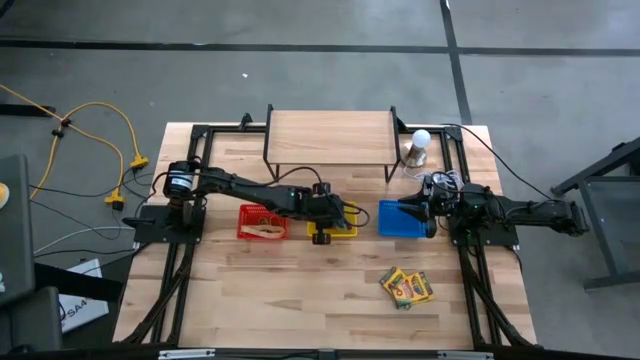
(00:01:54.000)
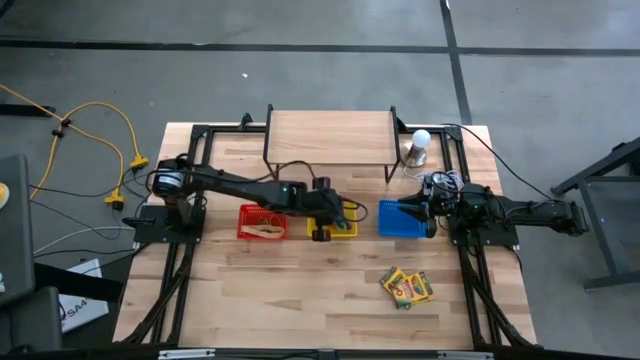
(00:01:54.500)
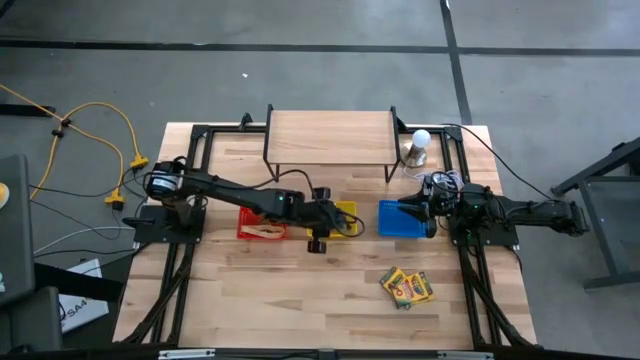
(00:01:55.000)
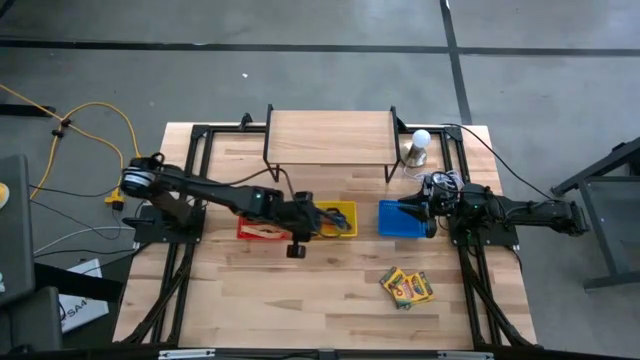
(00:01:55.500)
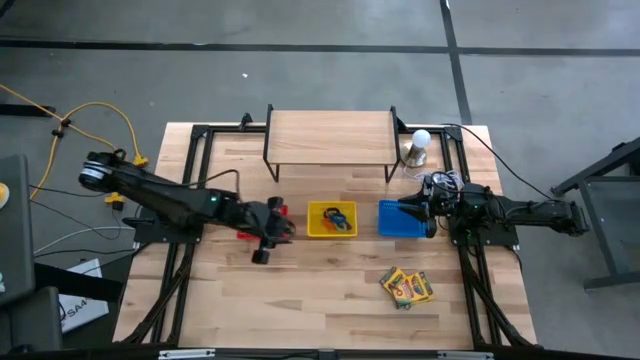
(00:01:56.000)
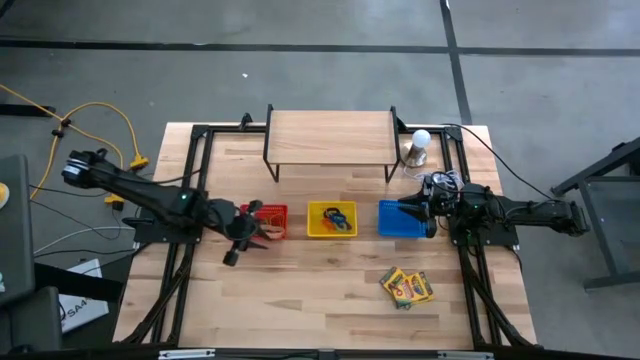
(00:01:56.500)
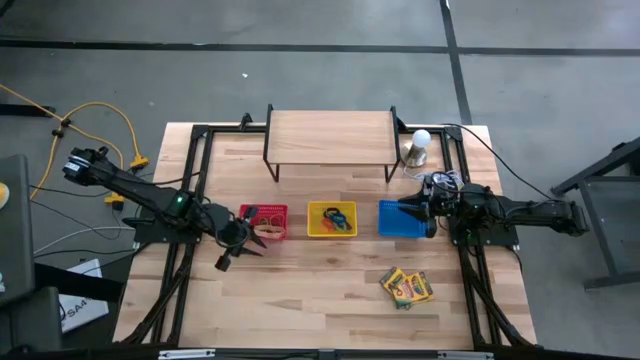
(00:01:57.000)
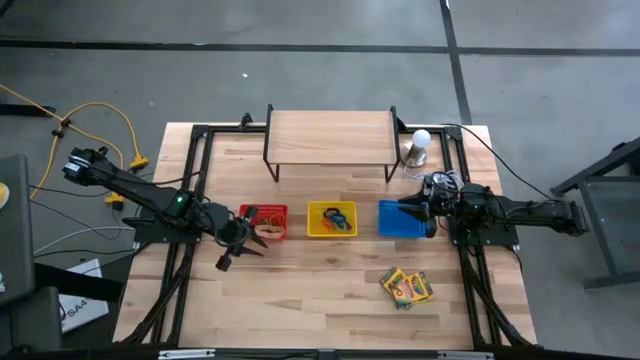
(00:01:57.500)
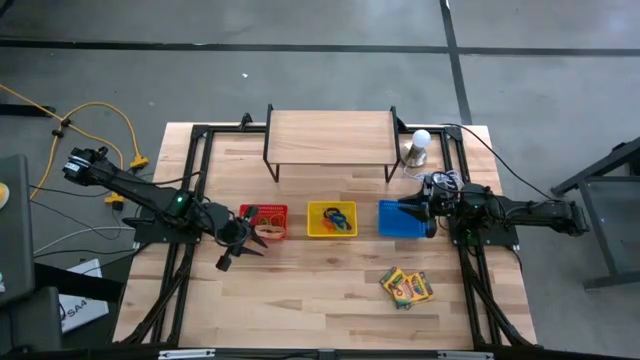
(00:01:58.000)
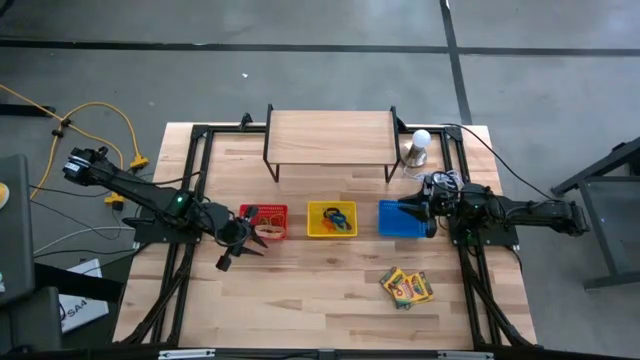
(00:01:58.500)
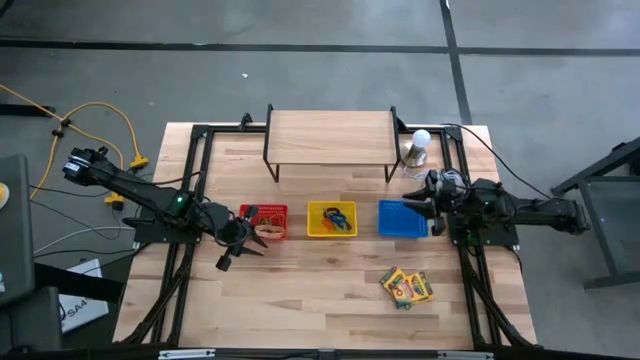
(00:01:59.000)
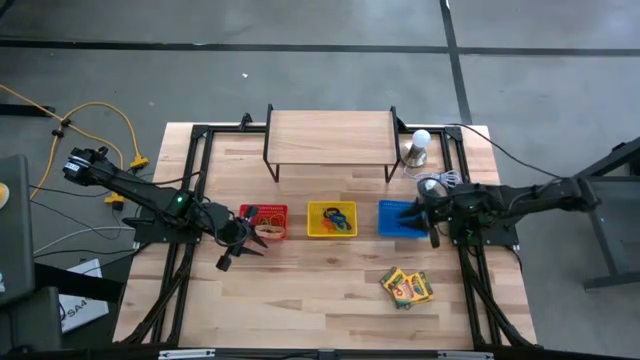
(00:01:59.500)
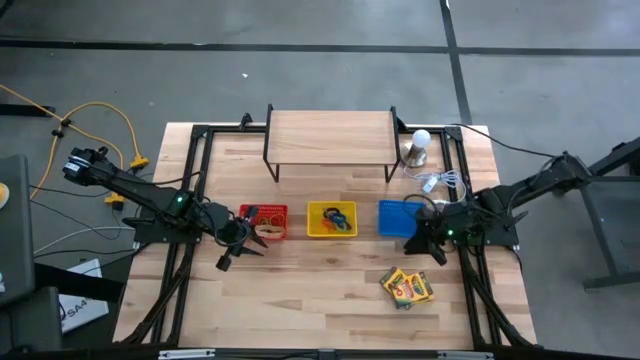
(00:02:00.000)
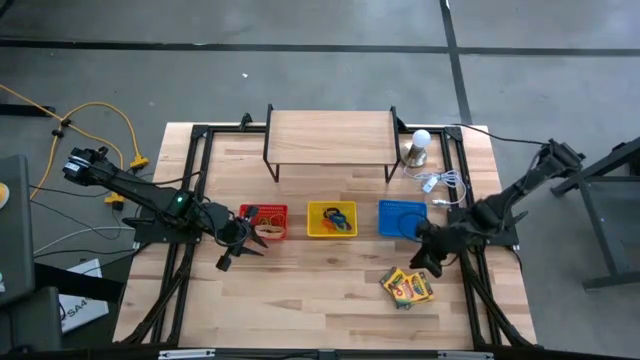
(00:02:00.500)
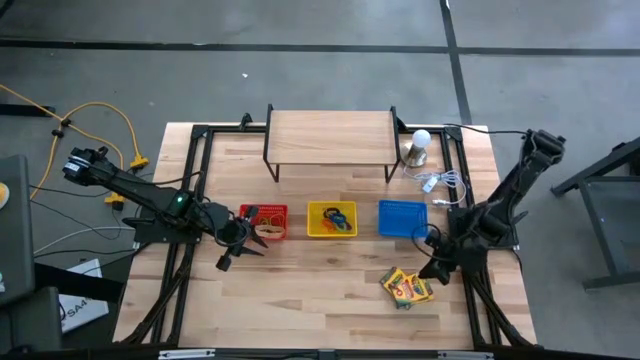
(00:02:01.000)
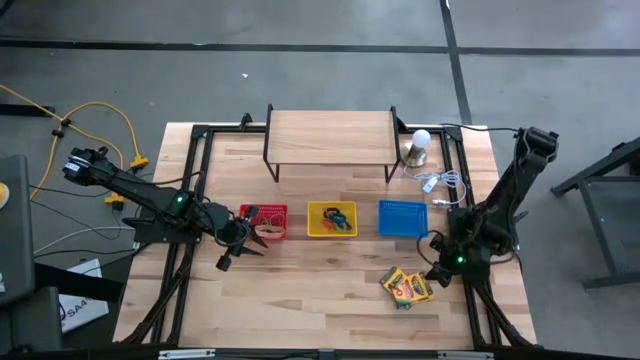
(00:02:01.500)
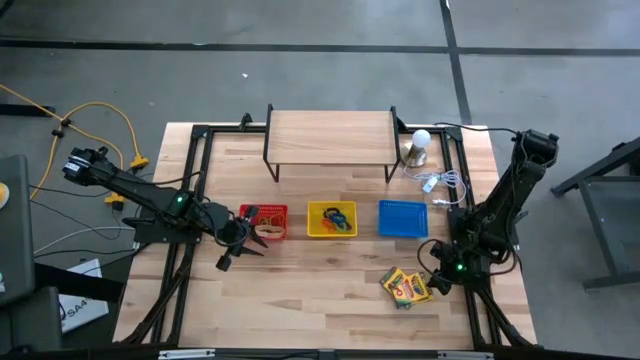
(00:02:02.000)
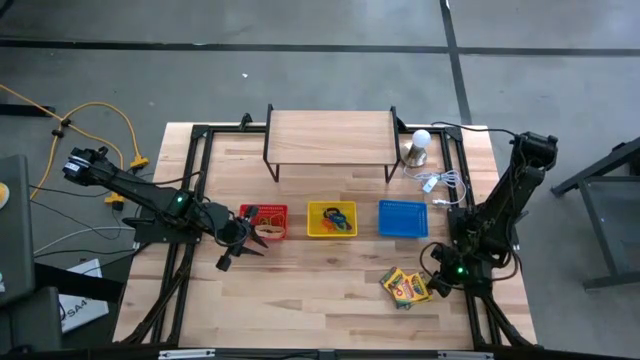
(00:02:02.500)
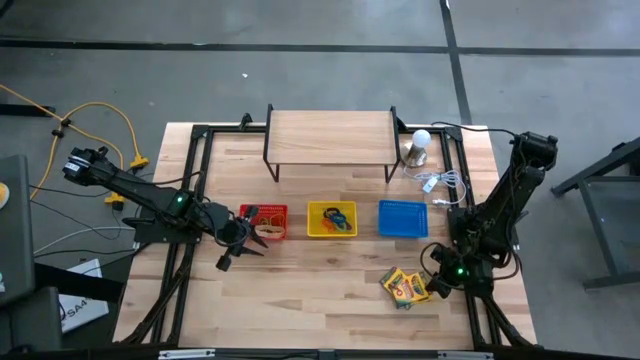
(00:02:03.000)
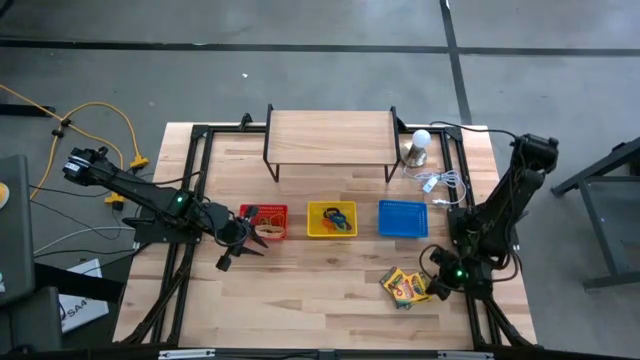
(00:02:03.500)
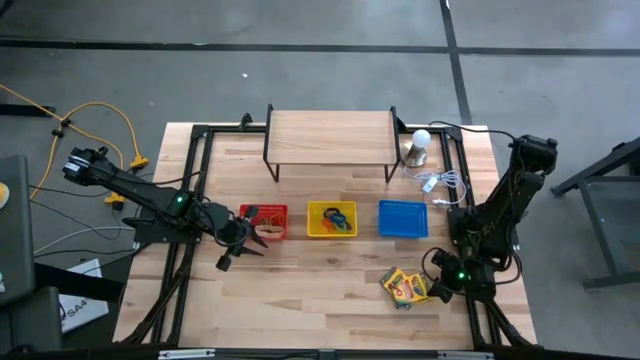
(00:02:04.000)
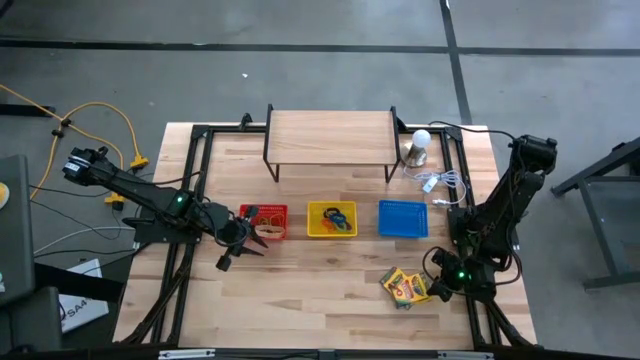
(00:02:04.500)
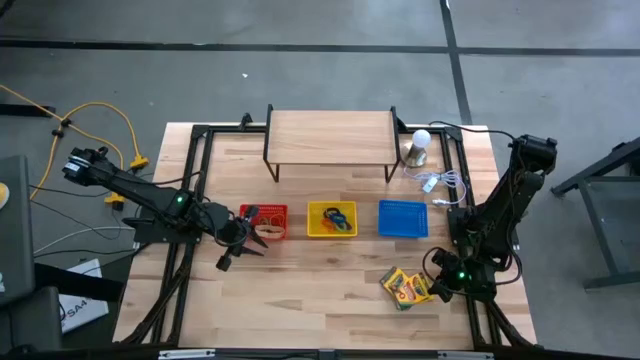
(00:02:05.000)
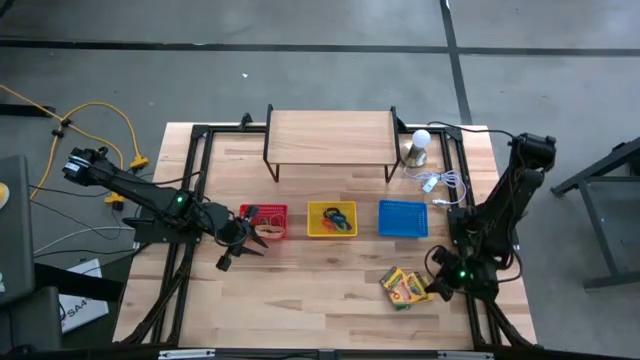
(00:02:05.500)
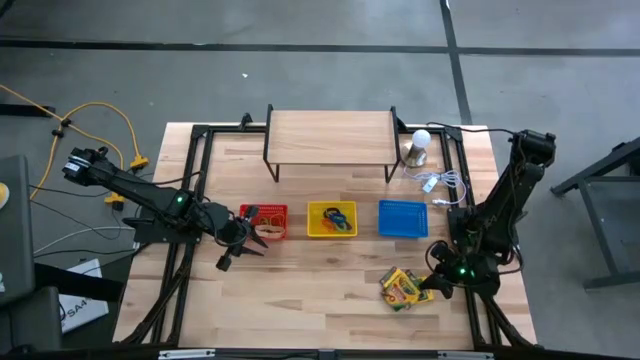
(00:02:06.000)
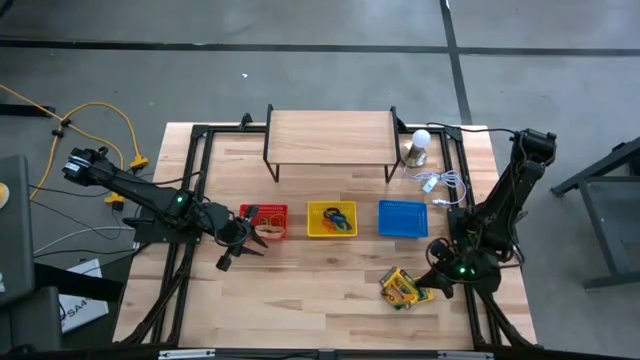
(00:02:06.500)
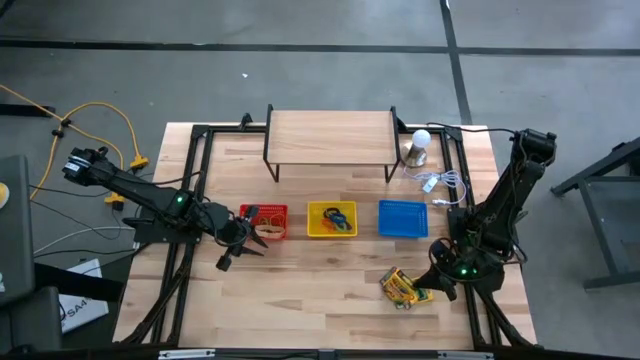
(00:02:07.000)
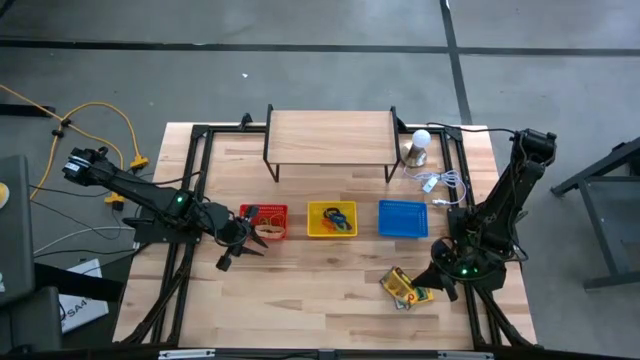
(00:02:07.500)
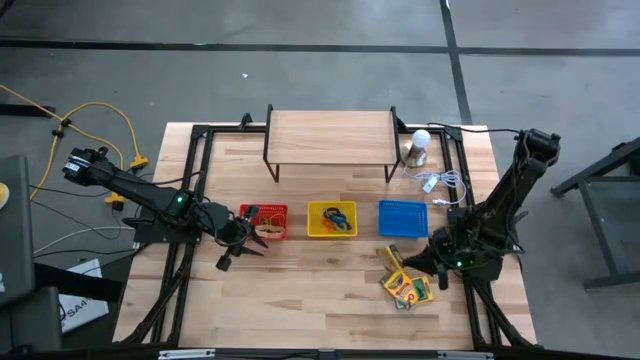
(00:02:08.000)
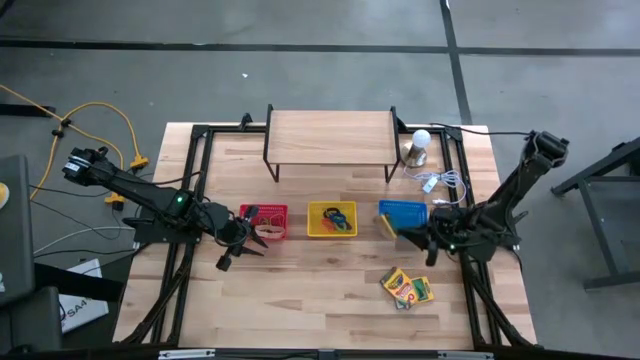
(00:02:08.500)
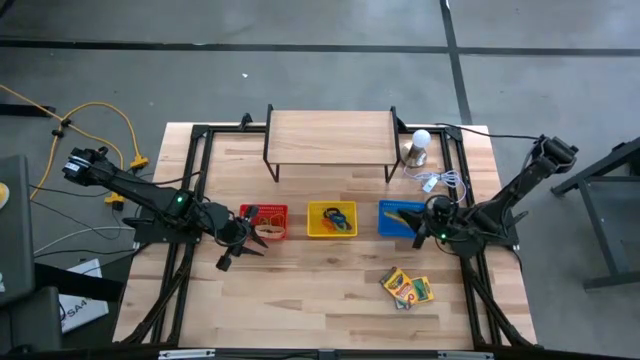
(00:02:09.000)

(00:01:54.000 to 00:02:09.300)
Task: Pick & Place Office Desk Supplies
Put the box of crayons into the blue bin

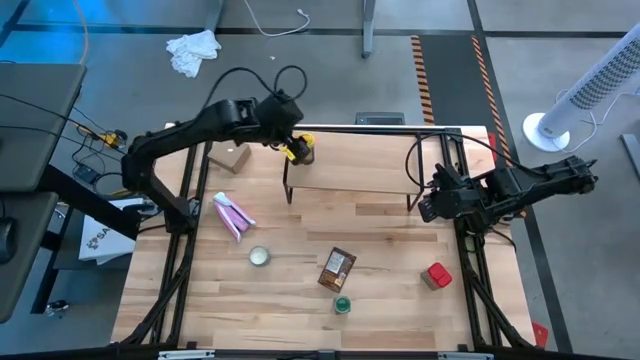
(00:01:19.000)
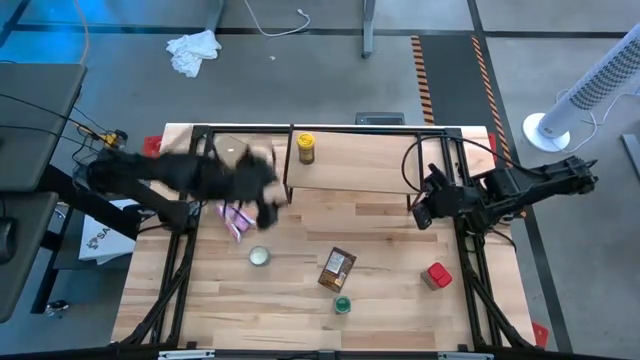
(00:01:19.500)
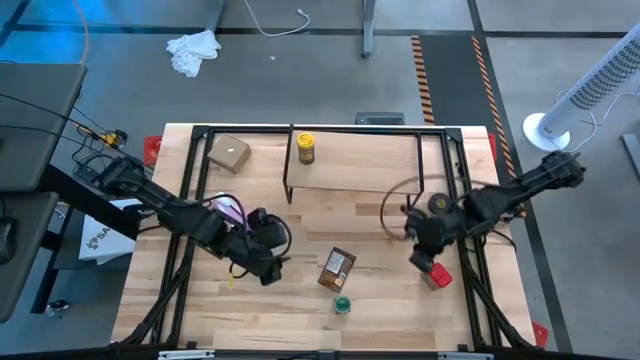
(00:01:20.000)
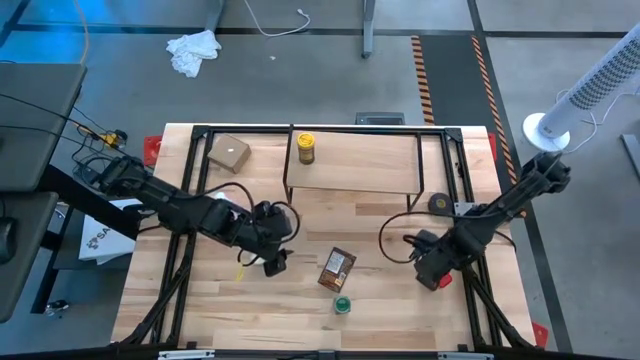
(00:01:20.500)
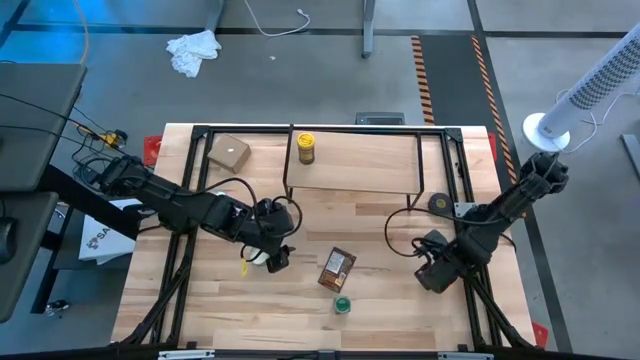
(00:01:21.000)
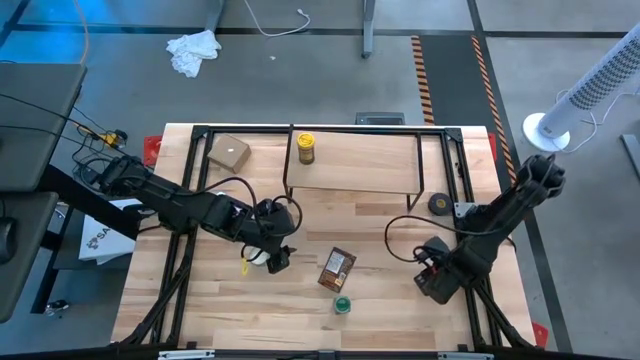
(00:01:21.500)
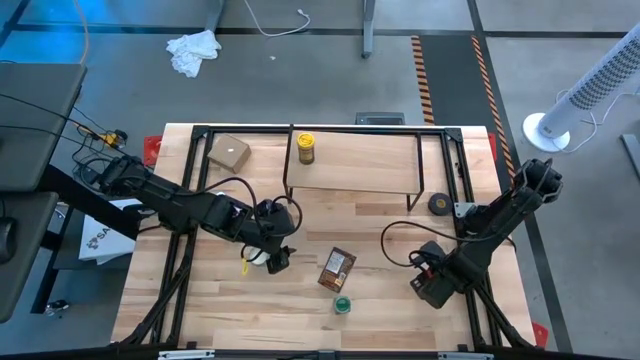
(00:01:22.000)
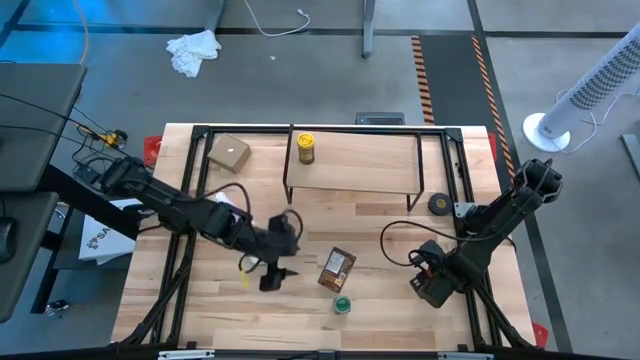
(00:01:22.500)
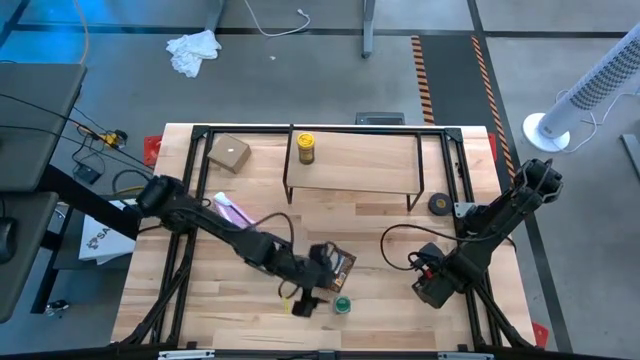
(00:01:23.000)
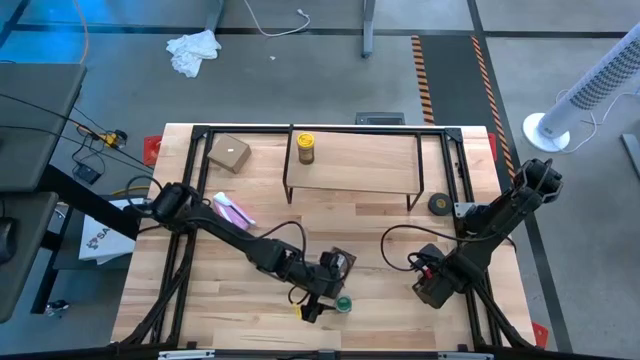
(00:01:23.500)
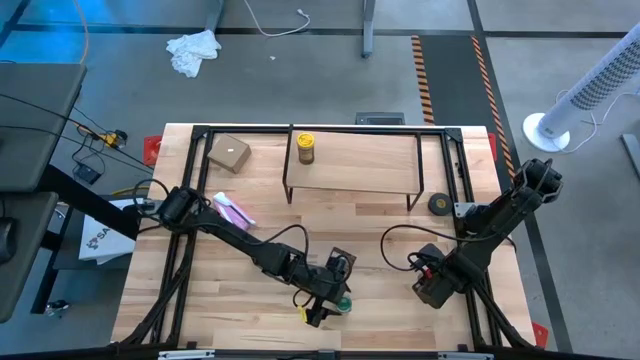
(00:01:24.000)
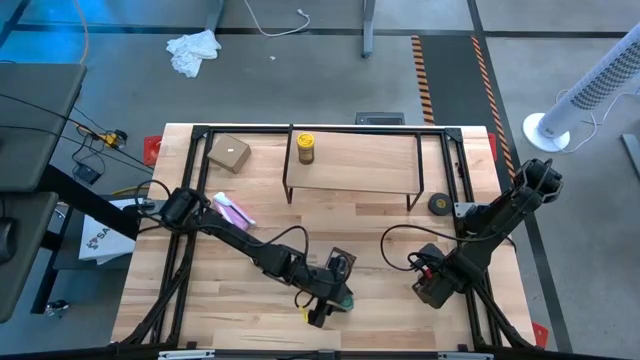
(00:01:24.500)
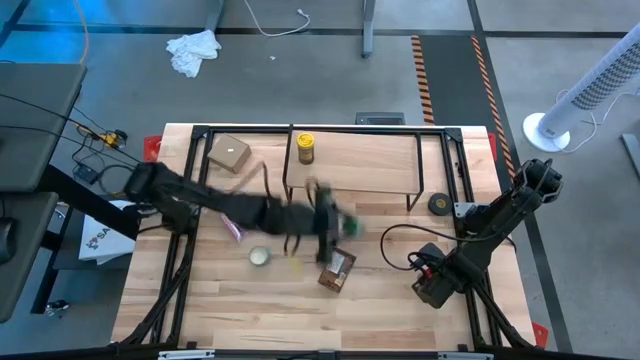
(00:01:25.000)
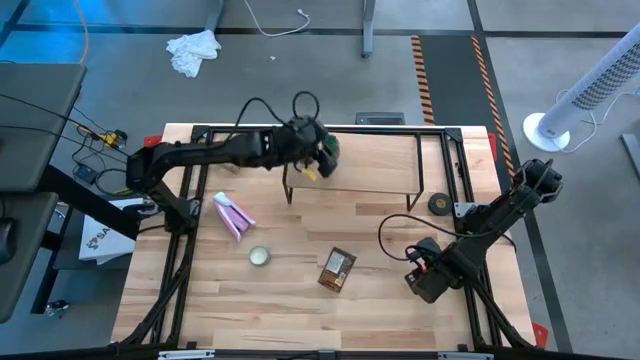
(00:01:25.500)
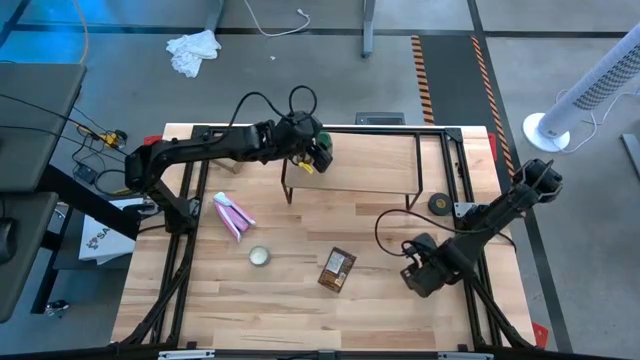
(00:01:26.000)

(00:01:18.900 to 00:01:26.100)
Task: Shelf spices
Put the green spice bottle on the shelf
